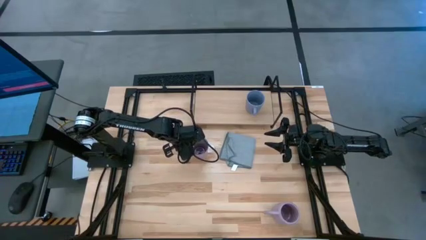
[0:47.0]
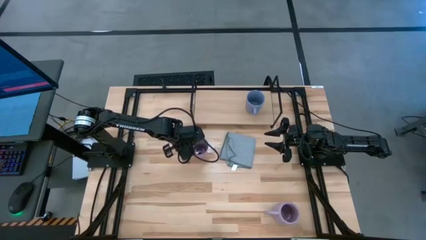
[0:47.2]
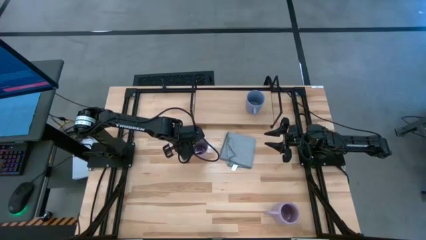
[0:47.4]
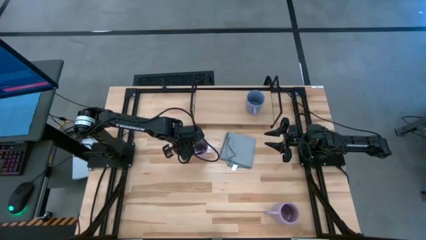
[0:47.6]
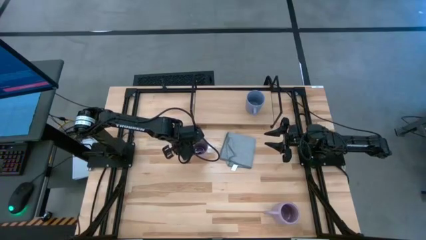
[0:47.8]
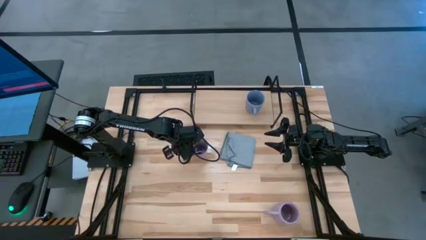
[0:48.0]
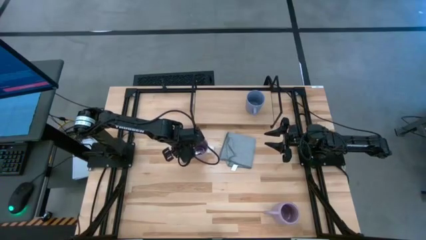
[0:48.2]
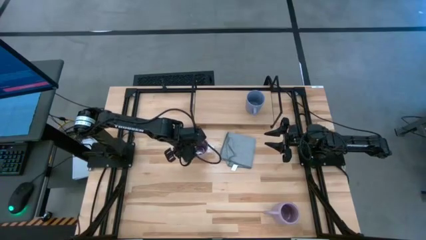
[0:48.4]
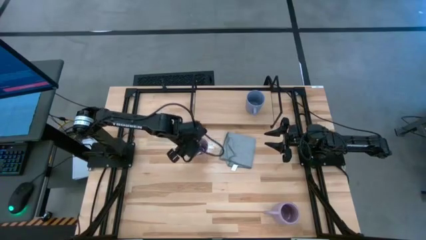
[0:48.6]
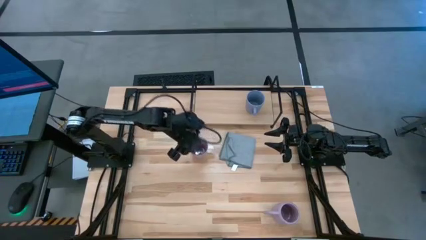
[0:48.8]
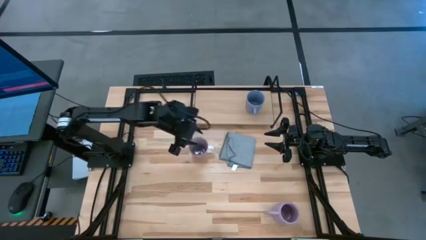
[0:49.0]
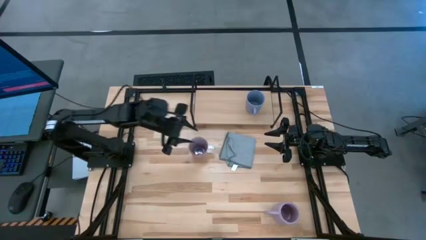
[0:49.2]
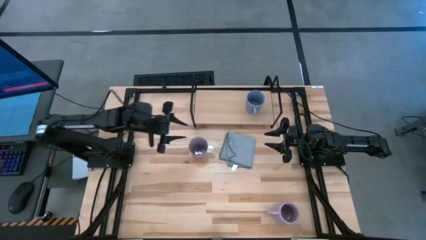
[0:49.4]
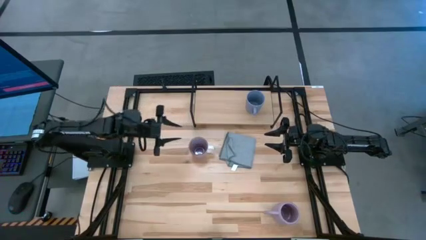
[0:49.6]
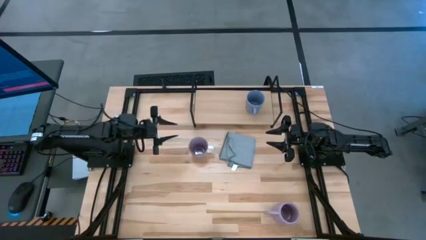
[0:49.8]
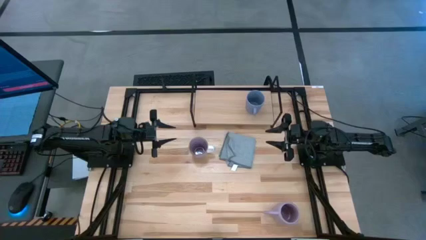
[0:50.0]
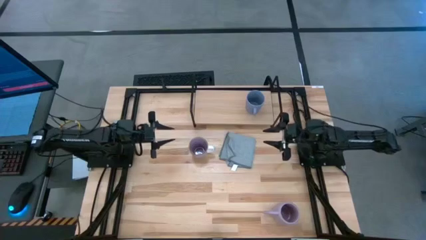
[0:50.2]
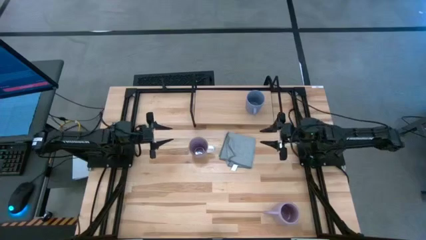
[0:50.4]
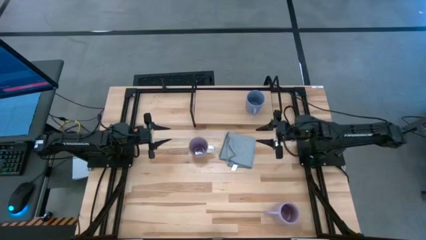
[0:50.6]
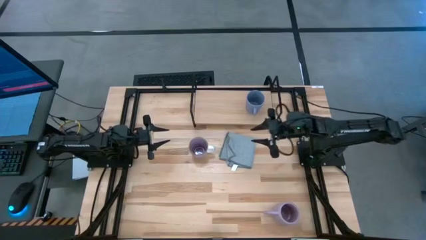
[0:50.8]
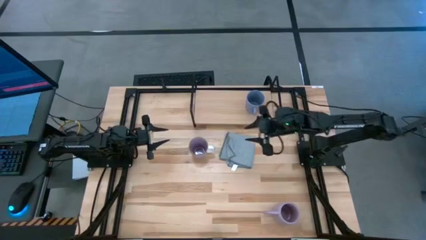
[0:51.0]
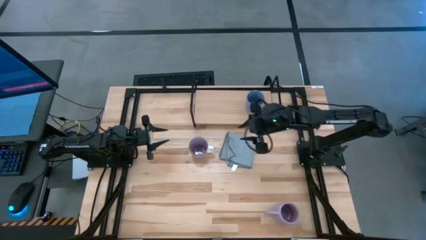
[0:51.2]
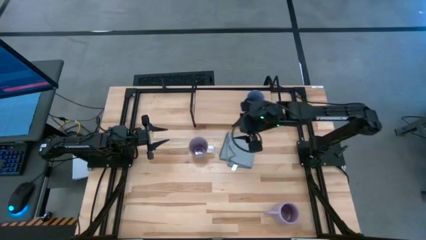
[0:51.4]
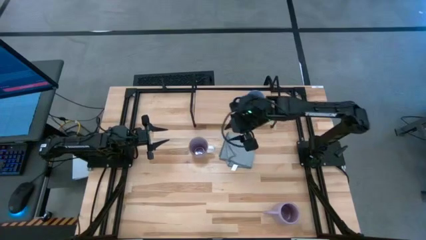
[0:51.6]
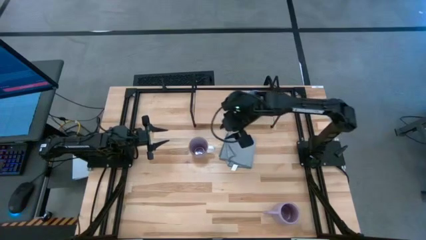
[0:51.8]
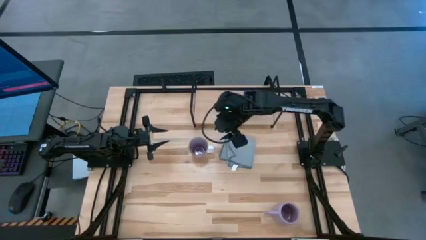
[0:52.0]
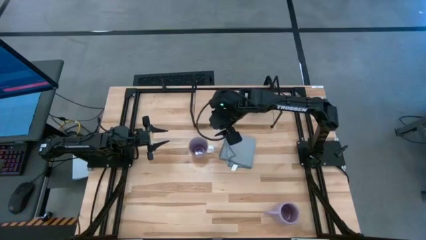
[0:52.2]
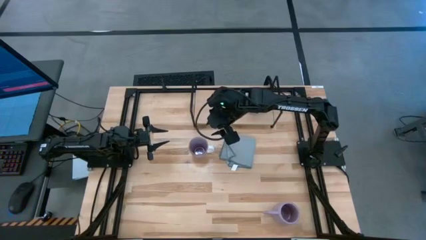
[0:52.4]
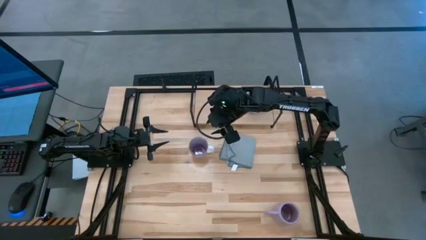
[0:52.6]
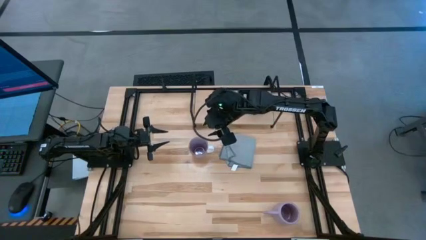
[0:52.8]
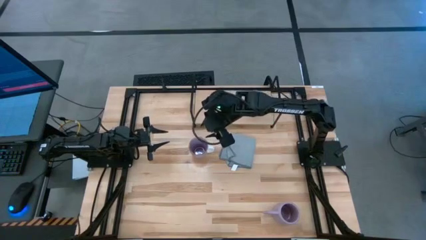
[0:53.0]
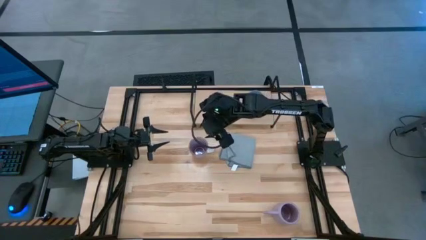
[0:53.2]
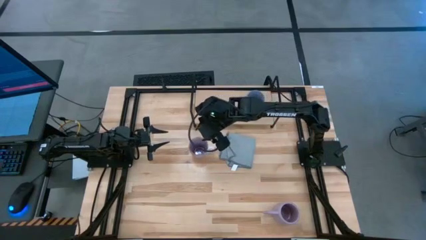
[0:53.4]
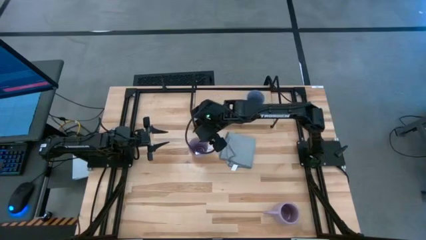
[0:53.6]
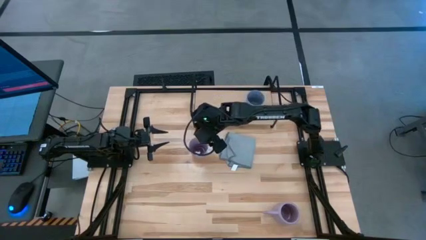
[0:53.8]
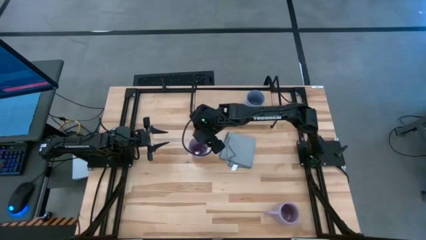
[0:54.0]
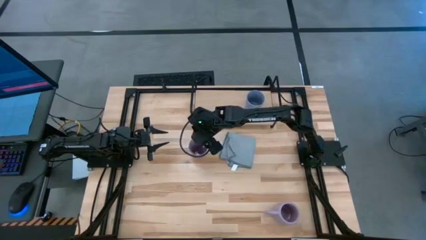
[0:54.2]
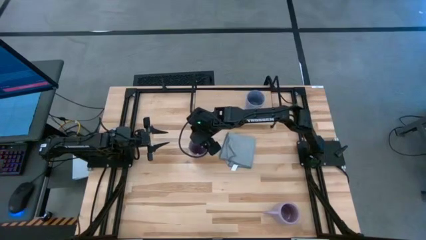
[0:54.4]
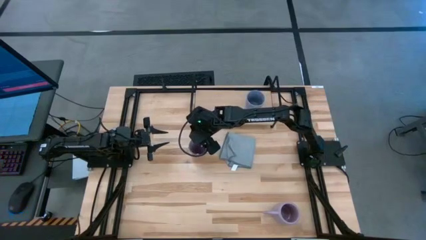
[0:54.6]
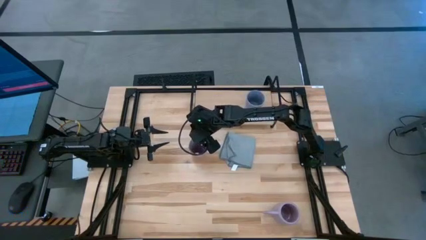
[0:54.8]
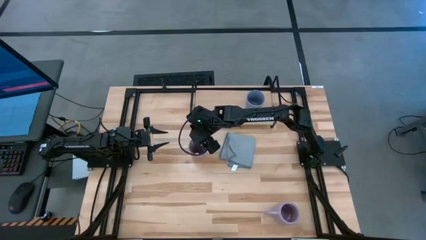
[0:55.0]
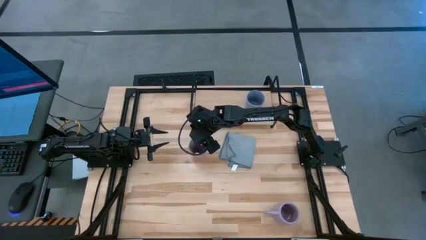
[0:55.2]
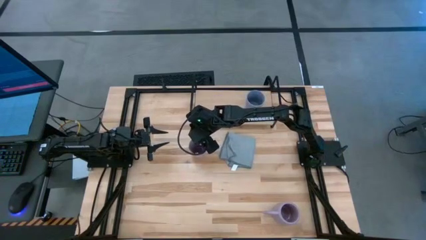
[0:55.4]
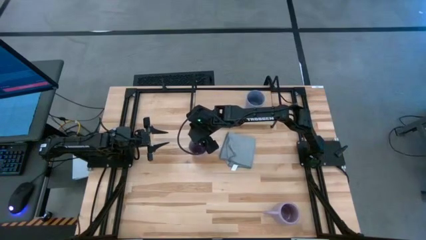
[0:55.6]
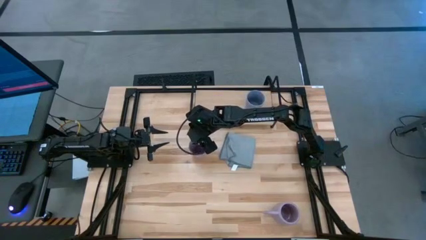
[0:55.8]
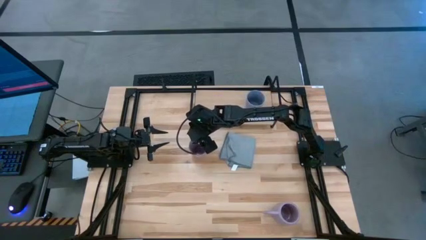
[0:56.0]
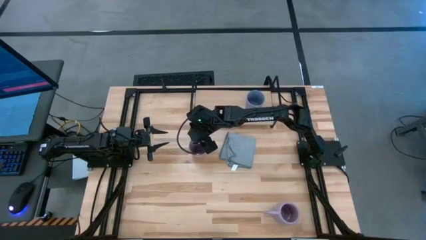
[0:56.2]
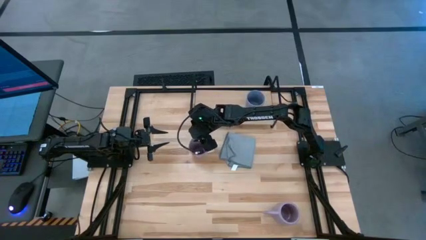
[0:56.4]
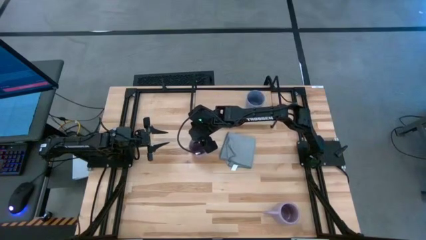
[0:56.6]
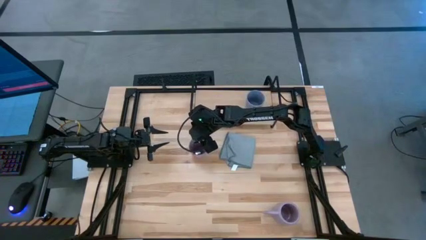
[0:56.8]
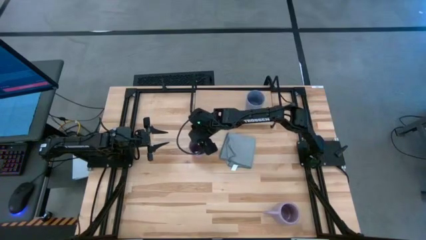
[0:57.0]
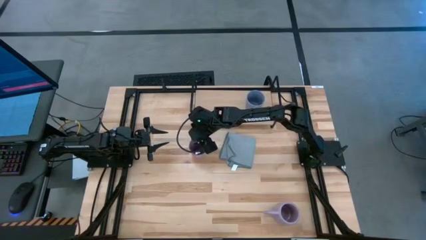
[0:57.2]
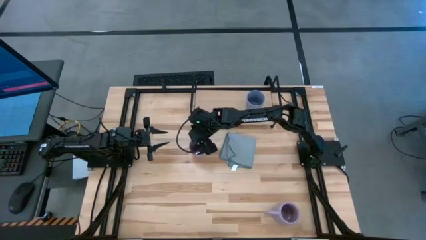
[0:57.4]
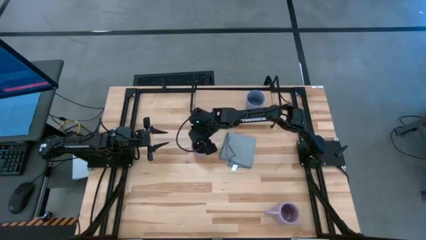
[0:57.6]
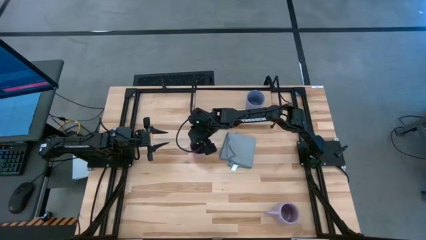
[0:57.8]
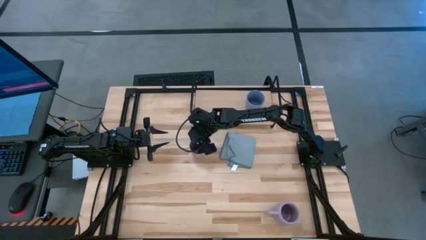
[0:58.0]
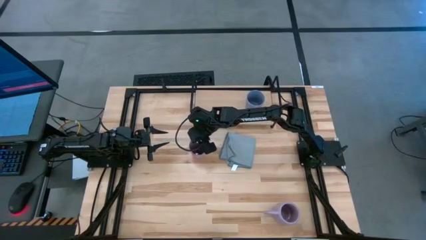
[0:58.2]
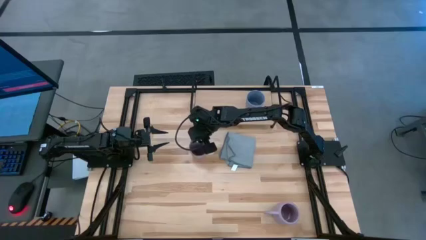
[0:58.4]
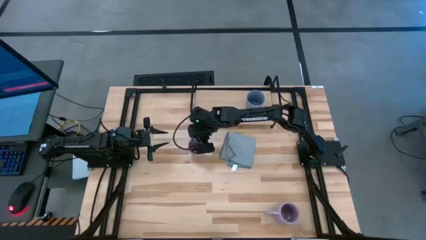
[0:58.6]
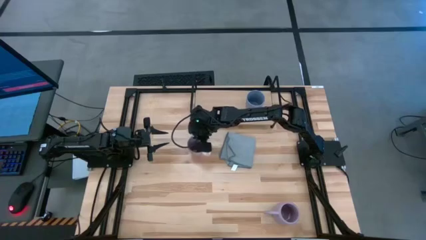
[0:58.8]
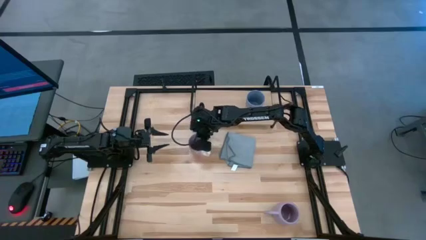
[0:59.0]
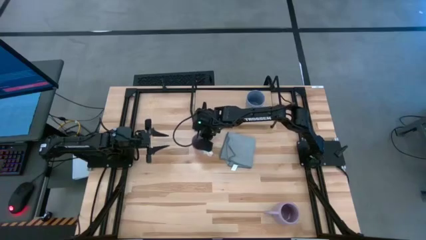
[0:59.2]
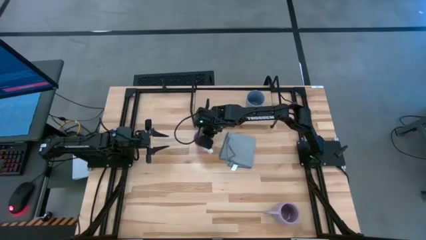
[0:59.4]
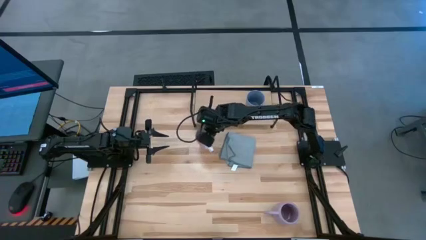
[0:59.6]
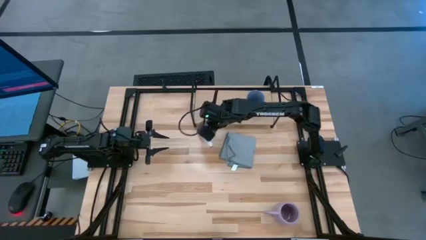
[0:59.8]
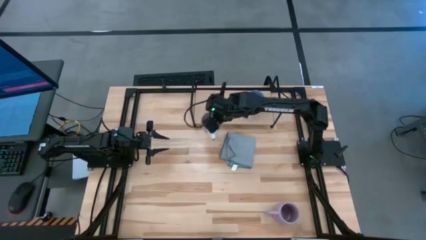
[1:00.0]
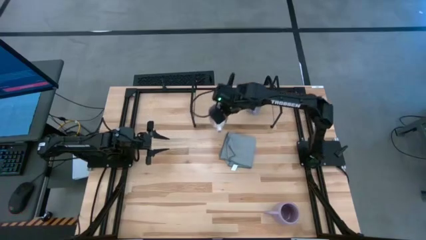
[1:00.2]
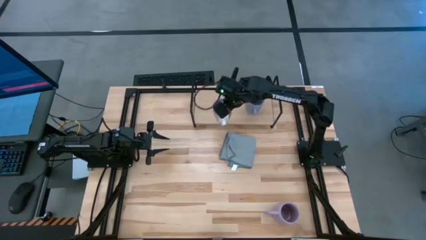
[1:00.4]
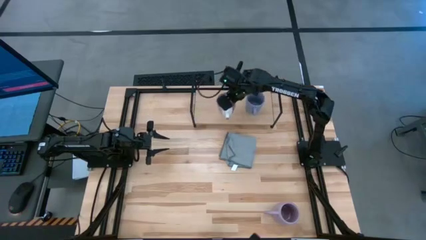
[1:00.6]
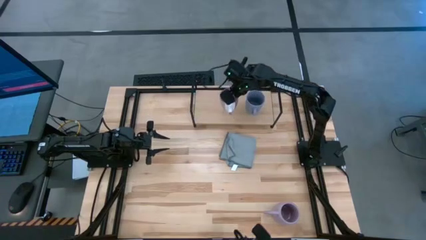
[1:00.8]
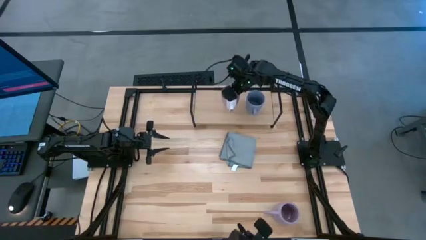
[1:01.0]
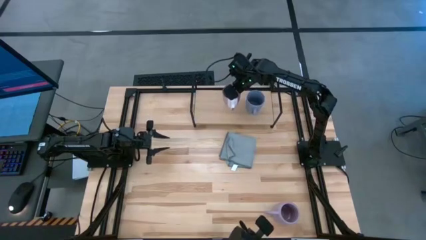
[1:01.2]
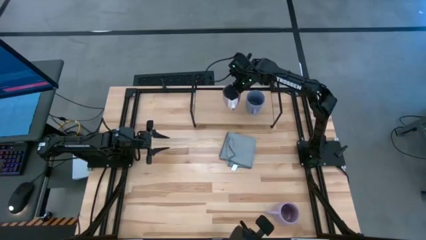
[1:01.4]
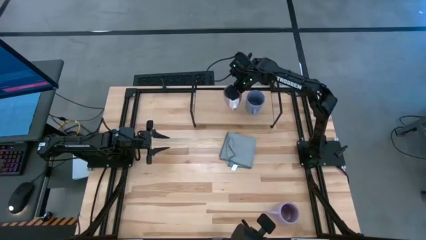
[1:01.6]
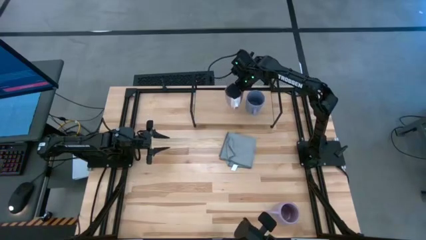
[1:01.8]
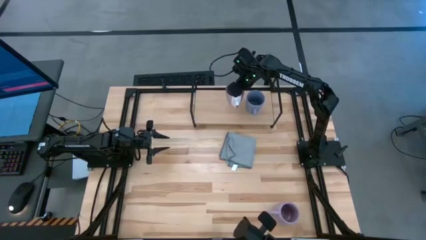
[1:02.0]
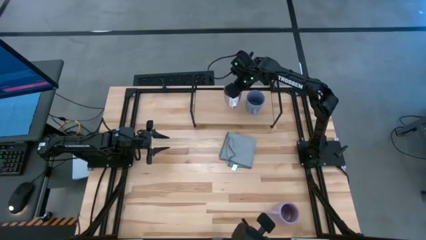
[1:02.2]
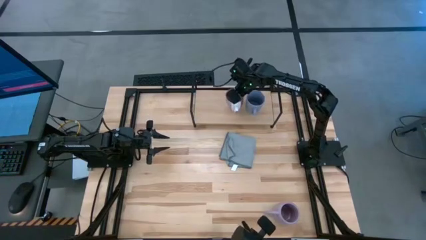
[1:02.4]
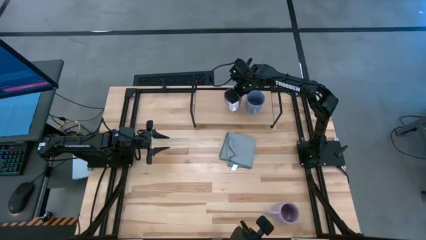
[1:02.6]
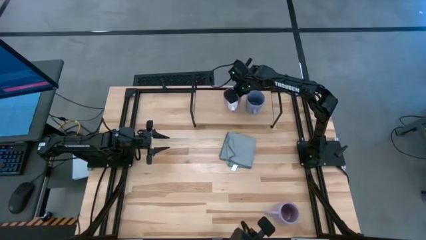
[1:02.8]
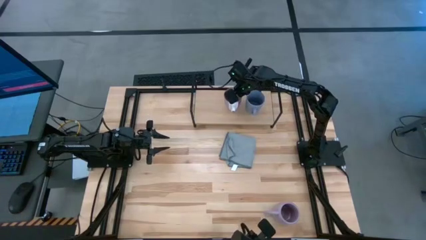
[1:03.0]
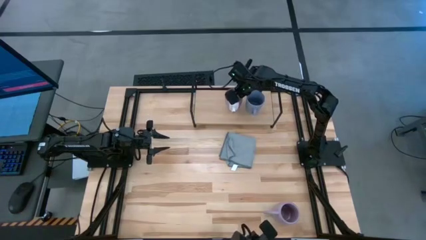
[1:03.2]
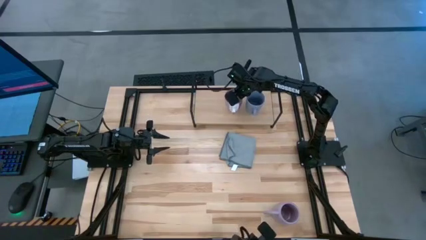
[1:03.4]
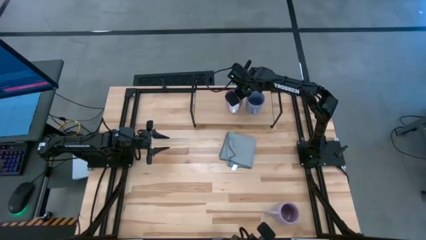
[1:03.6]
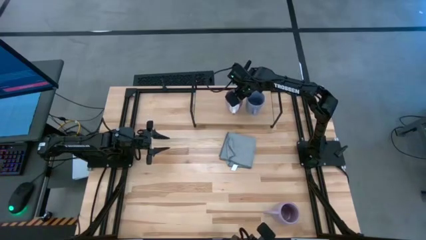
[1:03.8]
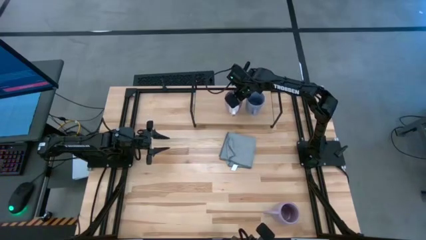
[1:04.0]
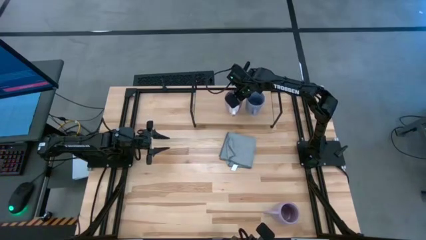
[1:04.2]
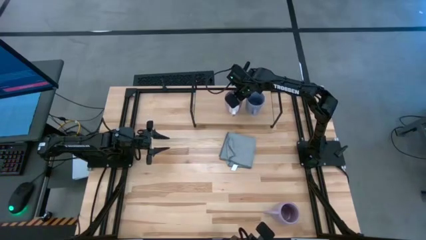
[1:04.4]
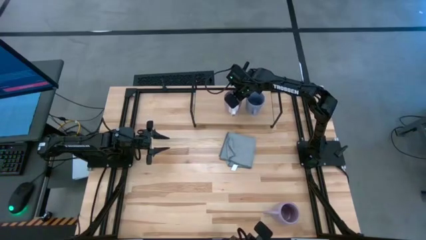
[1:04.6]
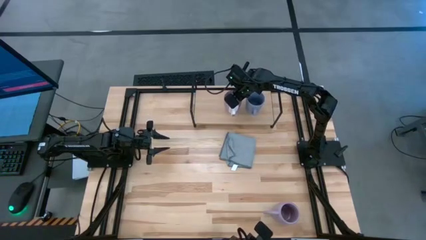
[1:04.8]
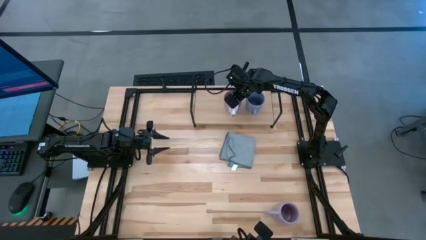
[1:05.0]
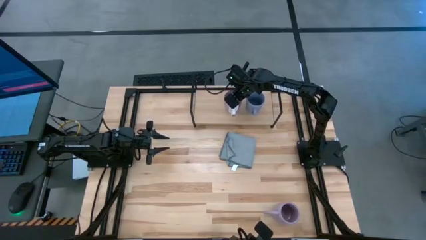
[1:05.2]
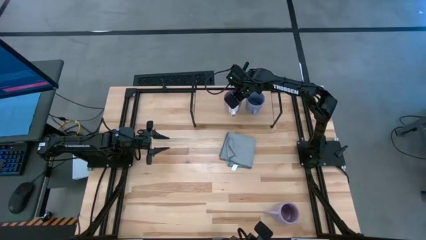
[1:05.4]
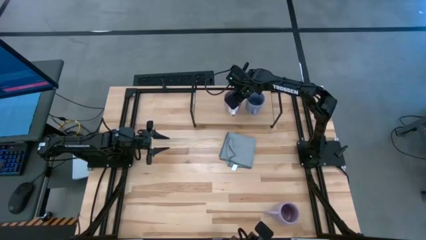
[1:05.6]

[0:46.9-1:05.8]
Task: Stack small to large cups/mugs on shelf
Put the top purple mug on the shelf
